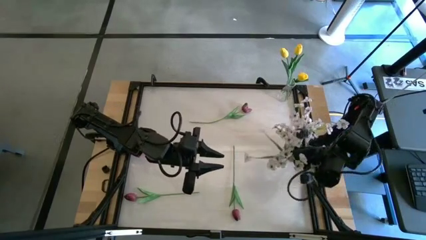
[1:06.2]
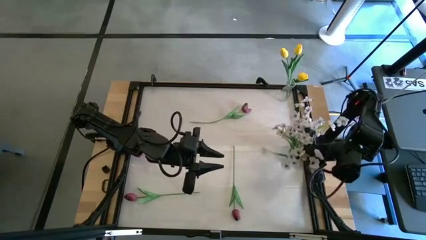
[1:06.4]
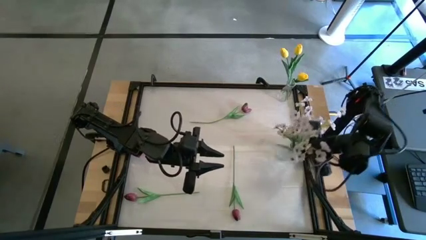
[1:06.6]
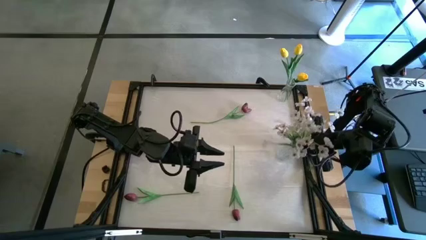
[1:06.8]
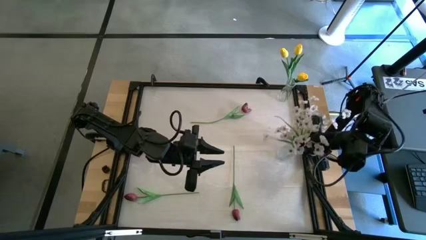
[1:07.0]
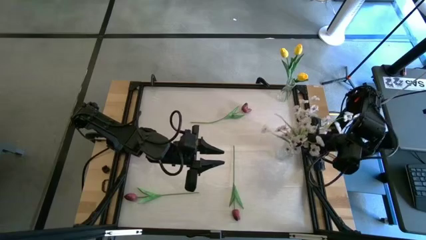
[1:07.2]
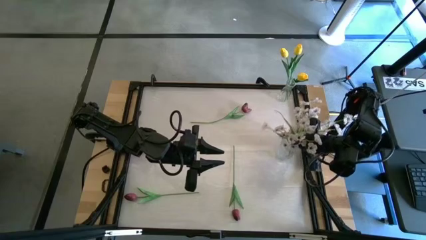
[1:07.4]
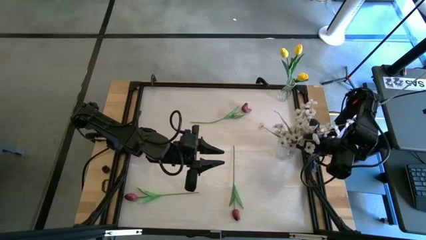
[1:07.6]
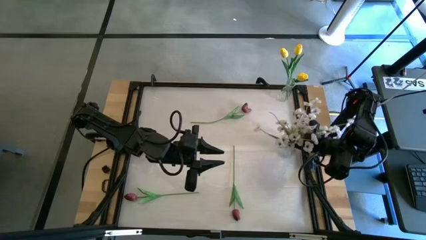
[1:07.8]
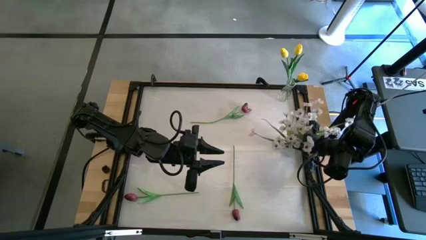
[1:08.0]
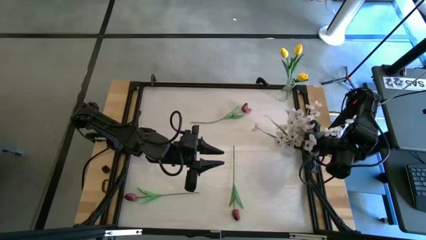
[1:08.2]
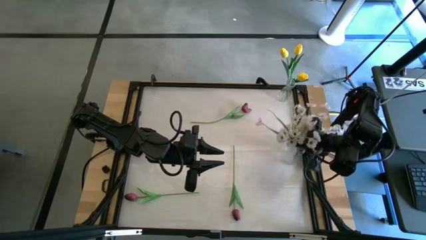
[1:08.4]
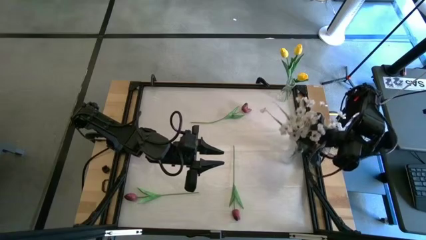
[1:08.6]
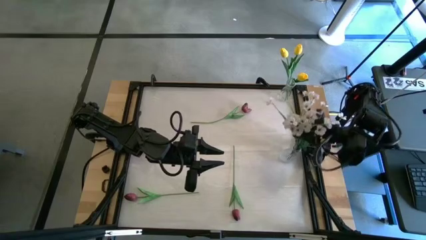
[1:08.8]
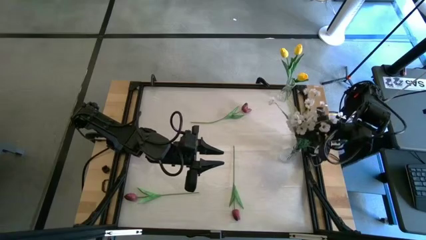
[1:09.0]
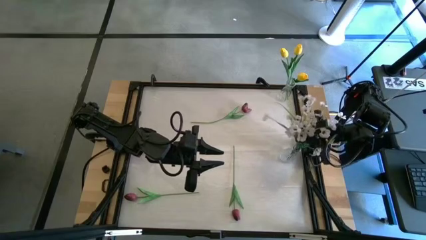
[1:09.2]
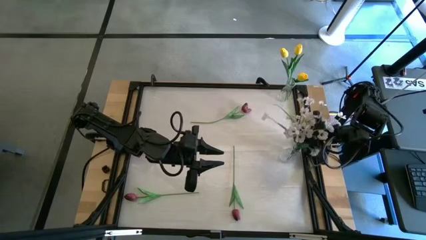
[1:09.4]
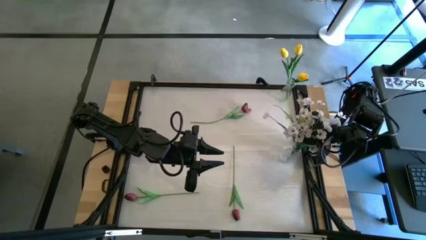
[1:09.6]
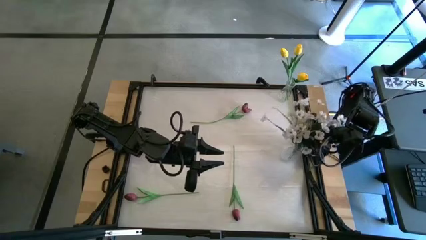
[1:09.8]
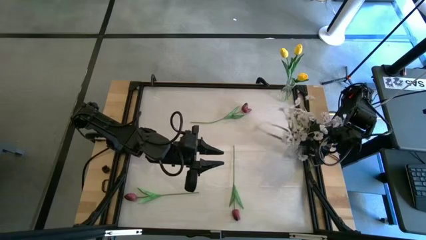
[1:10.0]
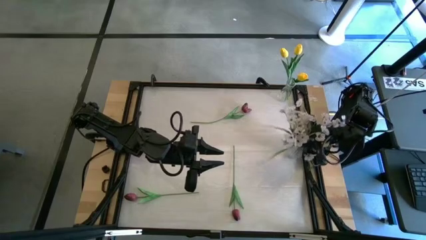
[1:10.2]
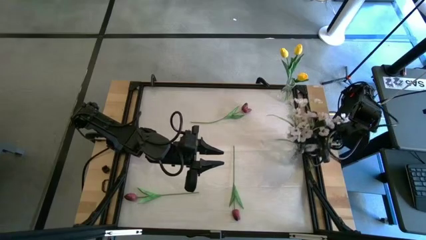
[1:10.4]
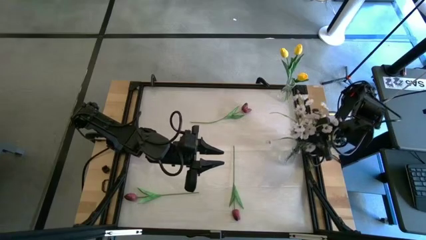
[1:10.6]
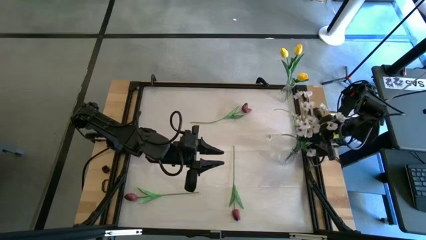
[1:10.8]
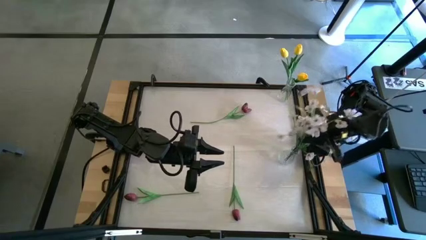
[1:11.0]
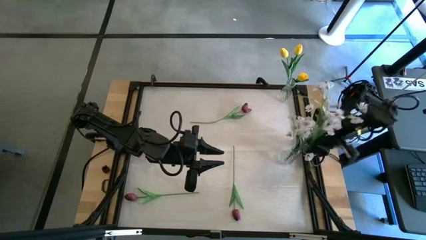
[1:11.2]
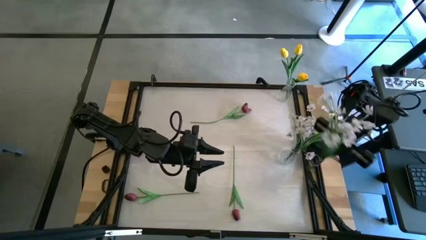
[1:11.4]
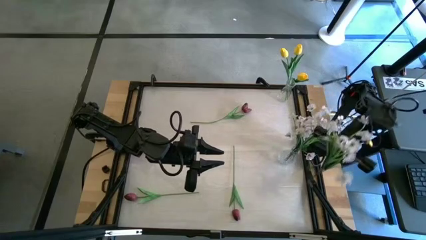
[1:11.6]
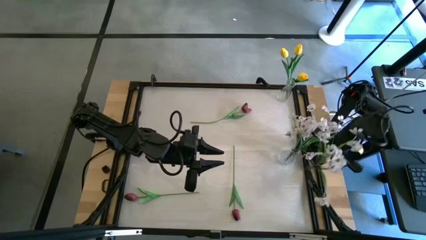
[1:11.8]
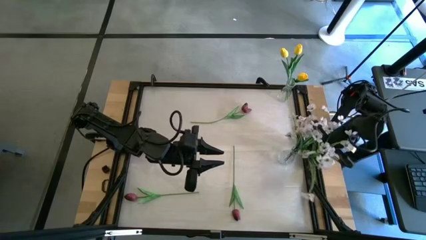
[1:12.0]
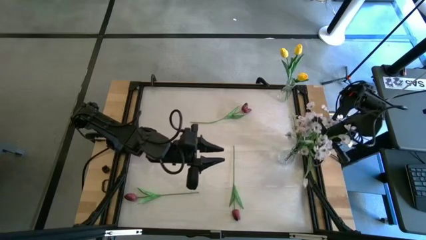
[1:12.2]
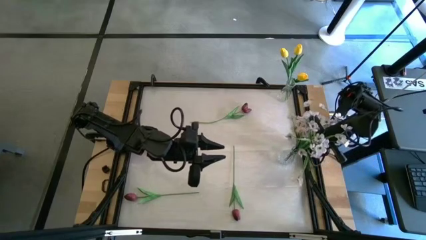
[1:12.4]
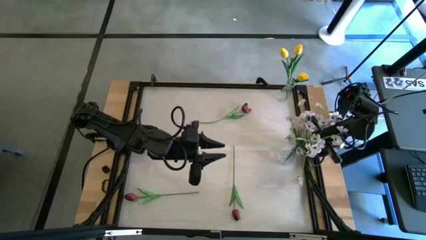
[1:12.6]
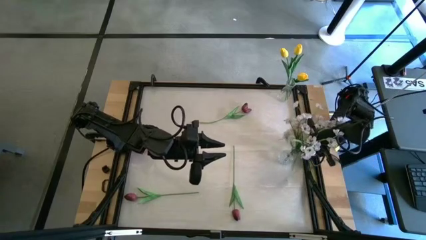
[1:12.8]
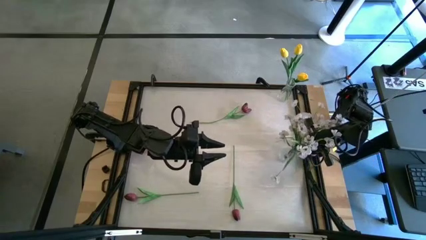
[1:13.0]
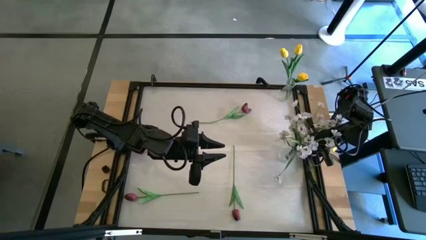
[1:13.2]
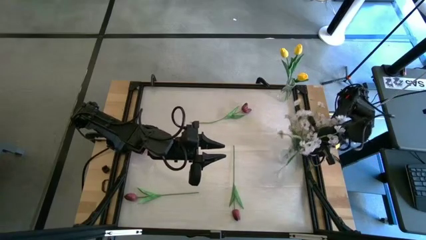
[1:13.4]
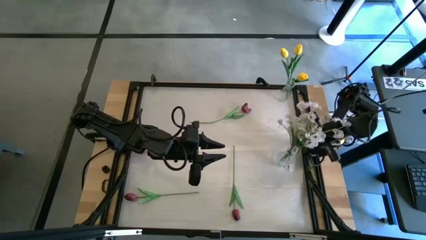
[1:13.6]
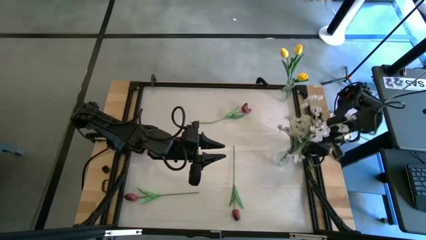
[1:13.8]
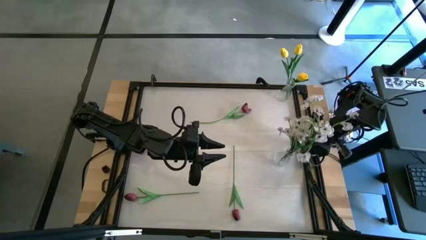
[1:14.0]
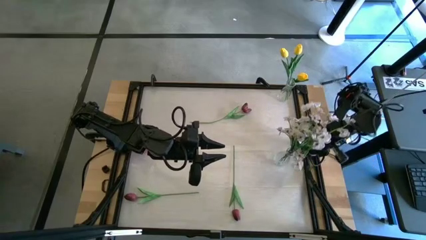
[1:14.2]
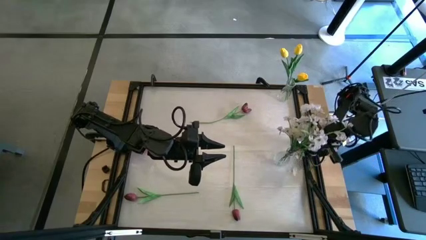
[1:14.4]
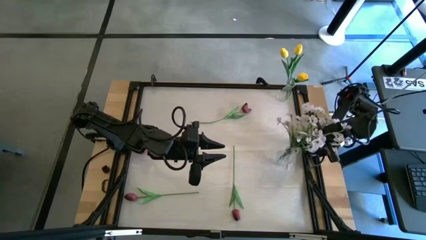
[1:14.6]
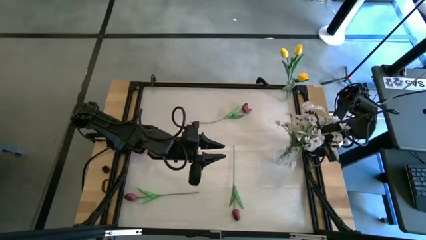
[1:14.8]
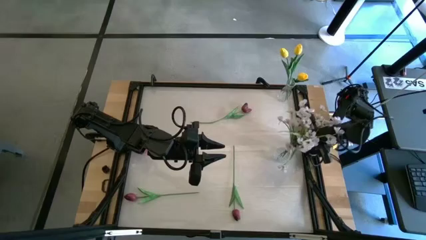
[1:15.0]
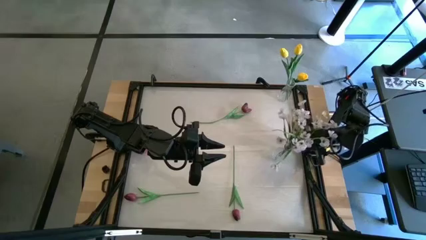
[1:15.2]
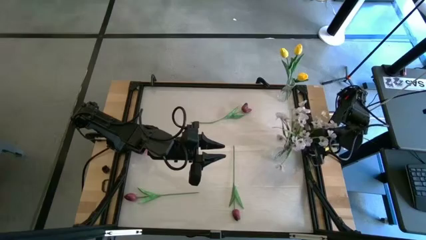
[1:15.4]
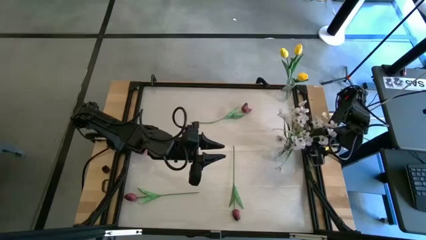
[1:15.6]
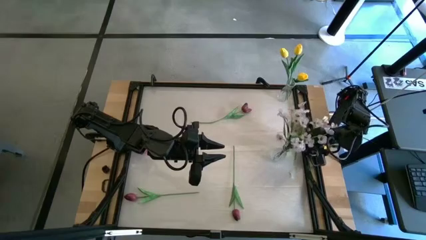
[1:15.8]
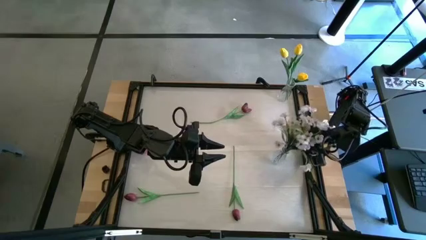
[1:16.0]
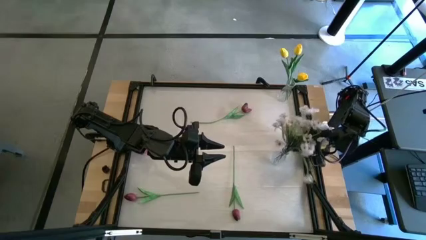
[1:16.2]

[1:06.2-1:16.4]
Task: Sort flowers into vase by color
Put the white flowers into the bottom transparent vase

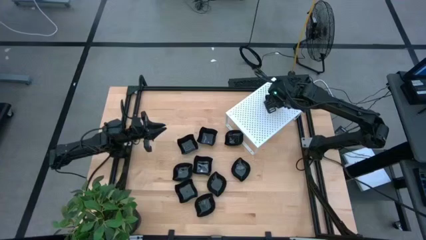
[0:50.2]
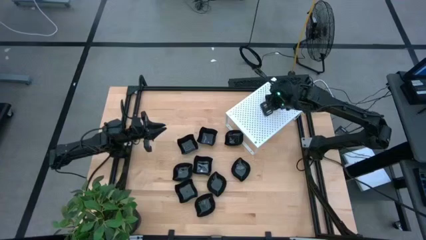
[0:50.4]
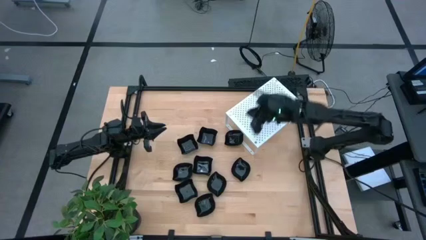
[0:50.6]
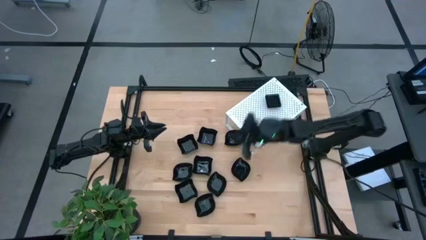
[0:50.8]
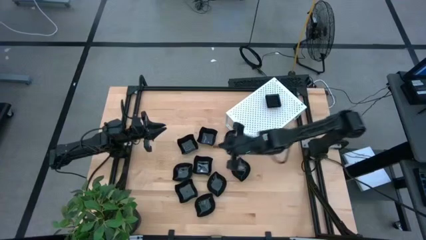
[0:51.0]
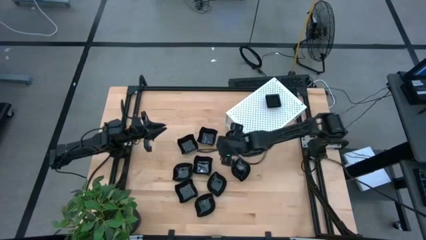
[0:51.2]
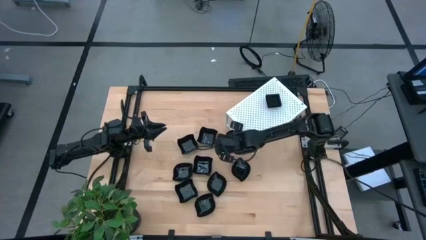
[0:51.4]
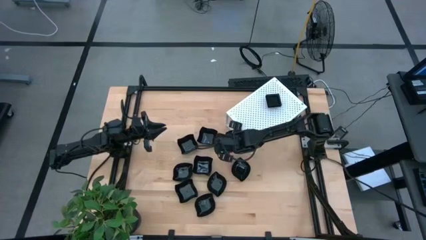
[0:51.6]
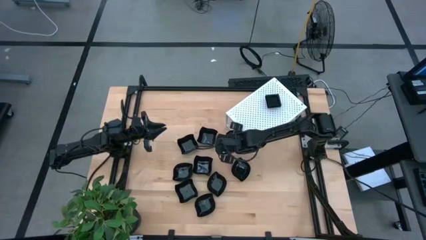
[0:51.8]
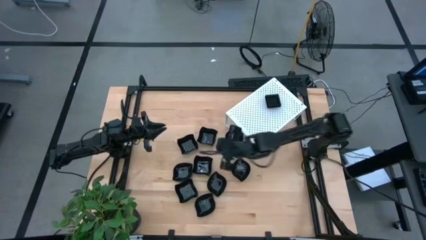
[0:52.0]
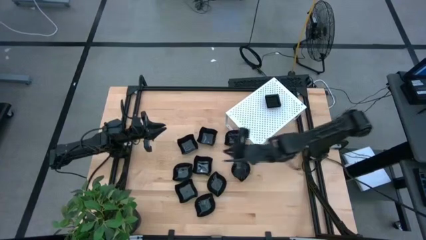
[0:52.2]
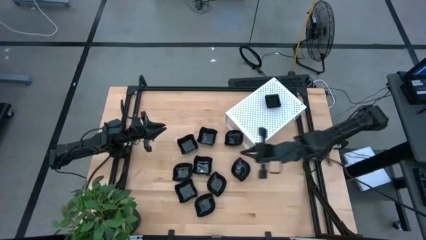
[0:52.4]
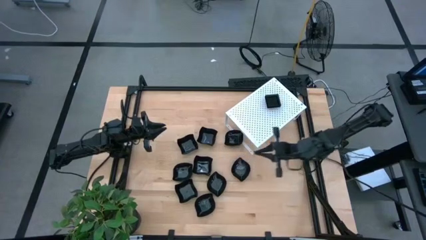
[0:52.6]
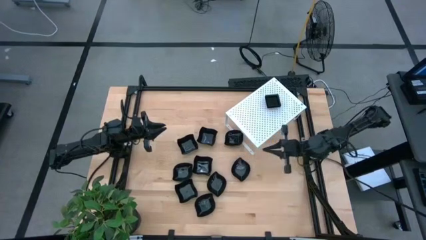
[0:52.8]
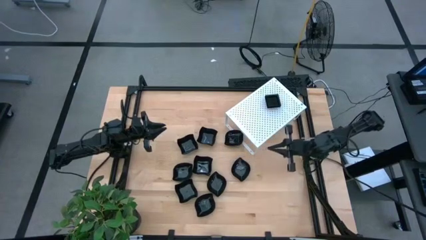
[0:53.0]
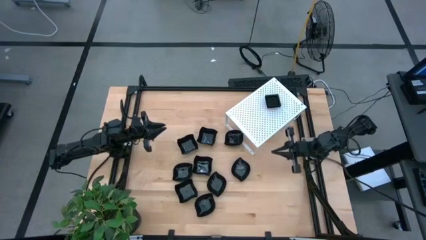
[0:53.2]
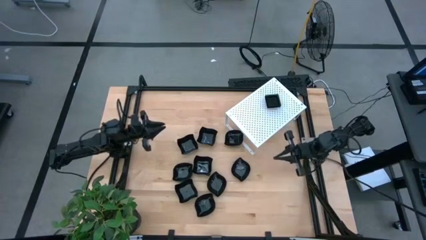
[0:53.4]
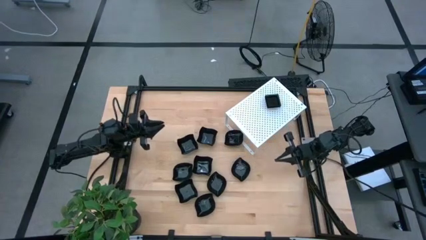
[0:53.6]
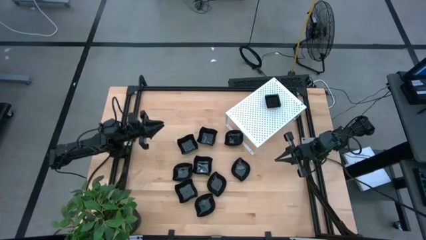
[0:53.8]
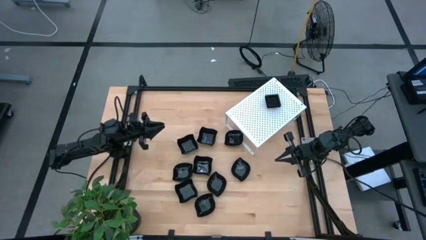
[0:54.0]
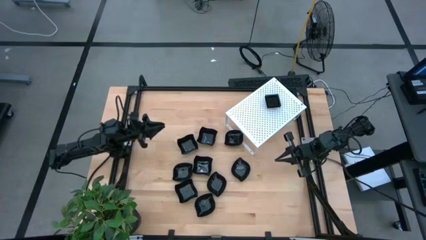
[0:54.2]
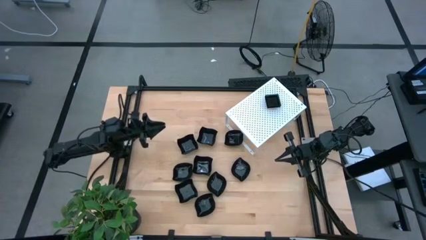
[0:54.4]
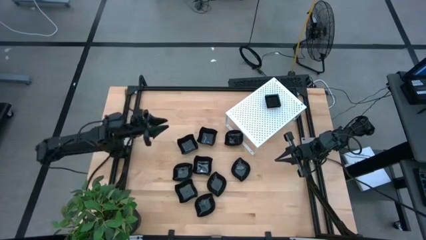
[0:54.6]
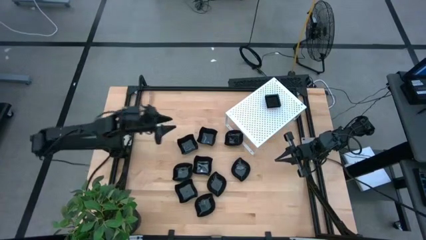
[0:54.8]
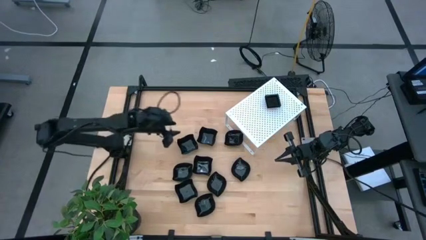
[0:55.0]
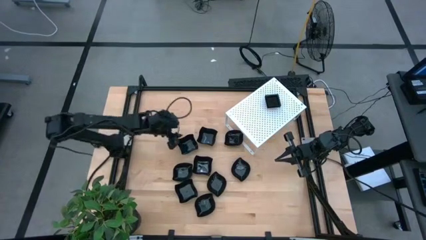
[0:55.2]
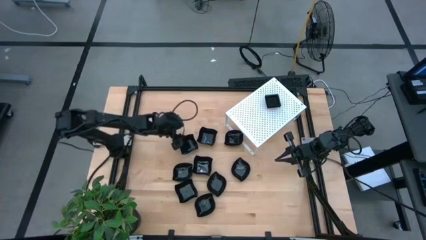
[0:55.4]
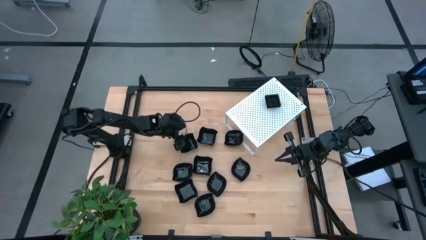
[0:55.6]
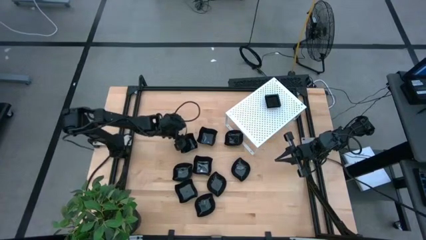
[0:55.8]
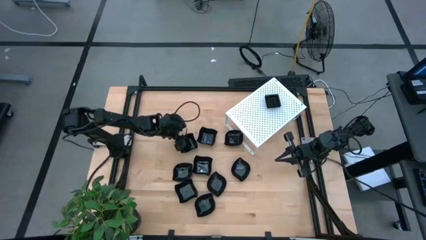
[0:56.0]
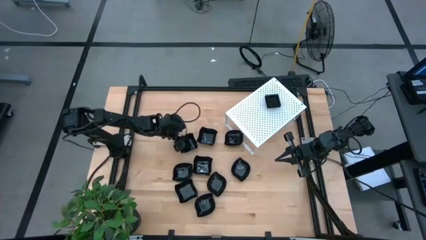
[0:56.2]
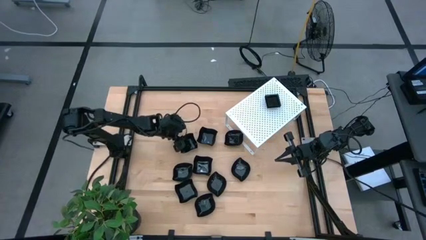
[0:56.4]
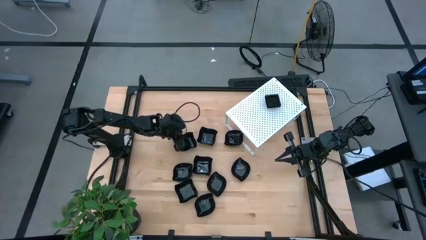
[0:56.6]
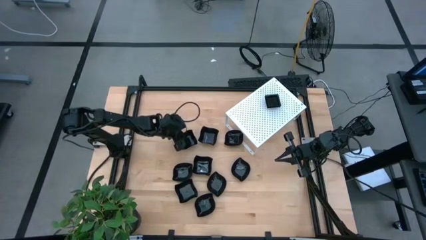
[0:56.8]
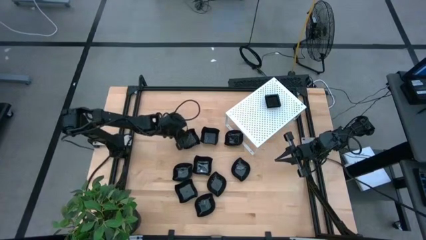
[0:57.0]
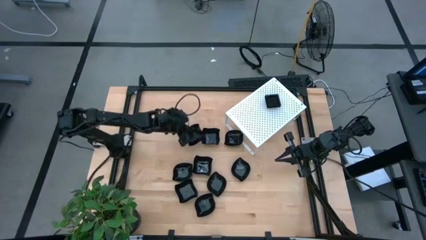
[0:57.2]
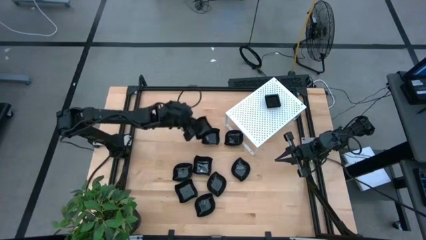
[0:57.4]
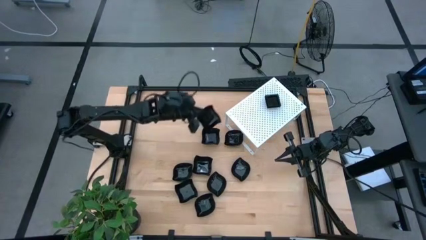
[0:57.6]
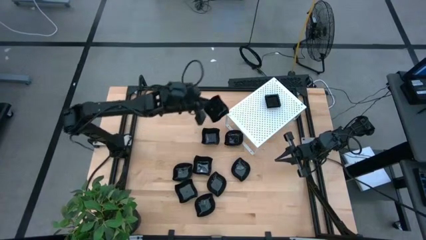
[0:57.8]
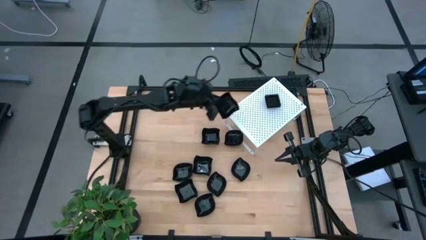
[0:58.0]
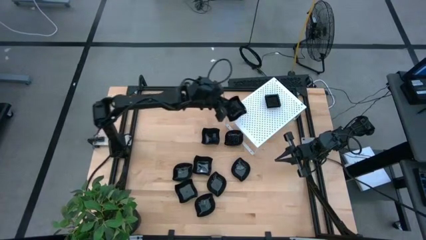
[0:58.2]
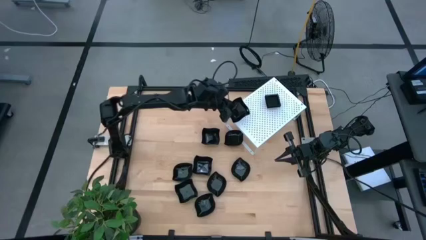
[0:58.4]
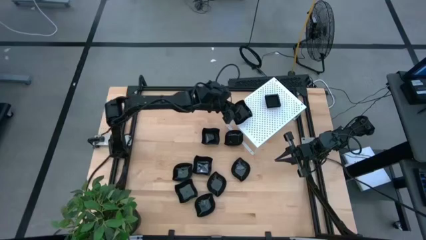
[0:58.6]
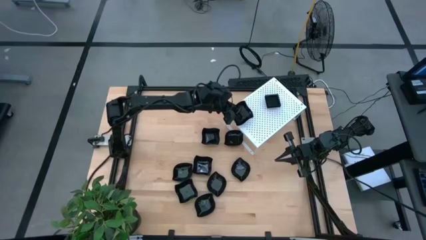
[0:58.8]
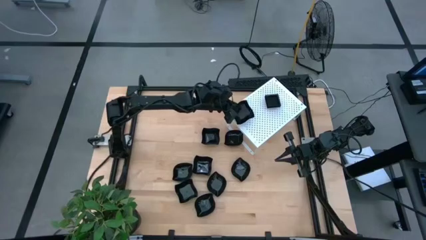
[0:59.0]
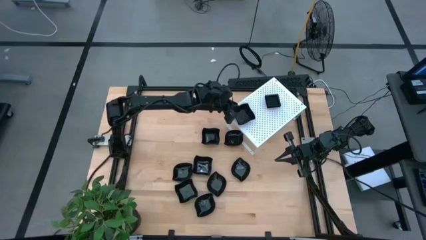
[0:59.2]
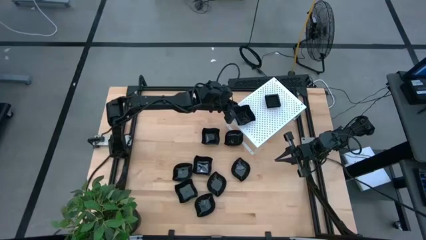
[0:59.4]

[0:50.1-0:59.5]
Task: Pick & Place Mini shaped plates
Put the black distorted square plate on the shelf
